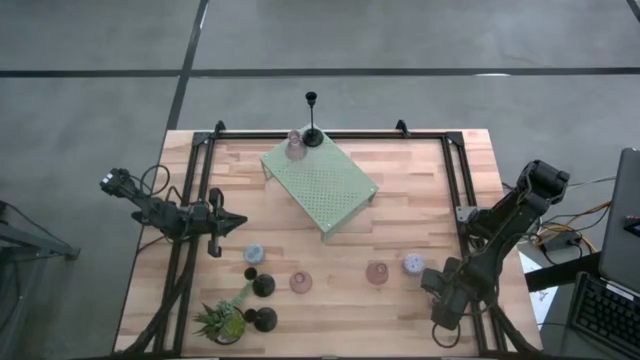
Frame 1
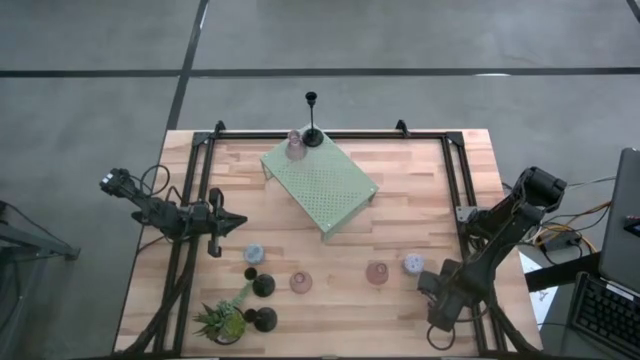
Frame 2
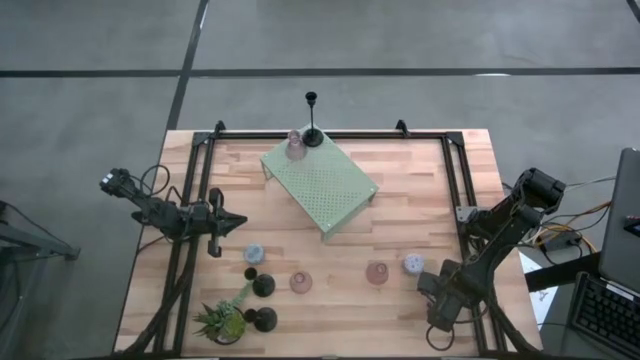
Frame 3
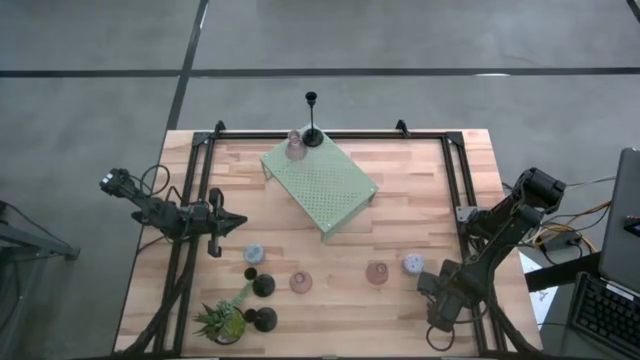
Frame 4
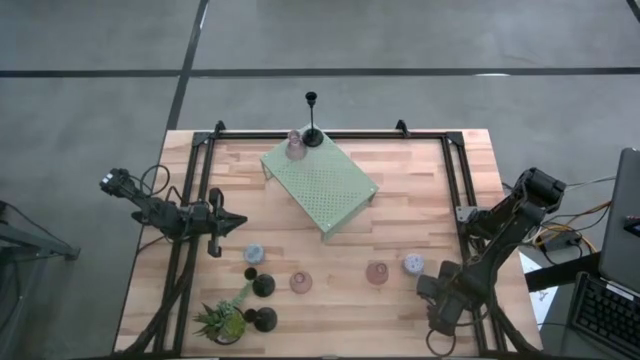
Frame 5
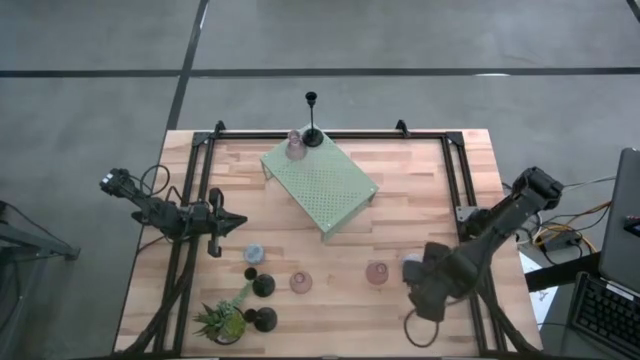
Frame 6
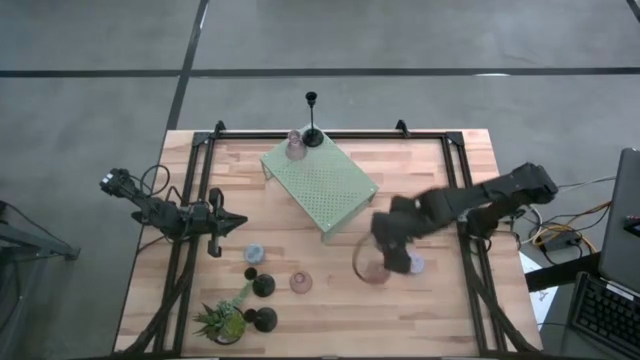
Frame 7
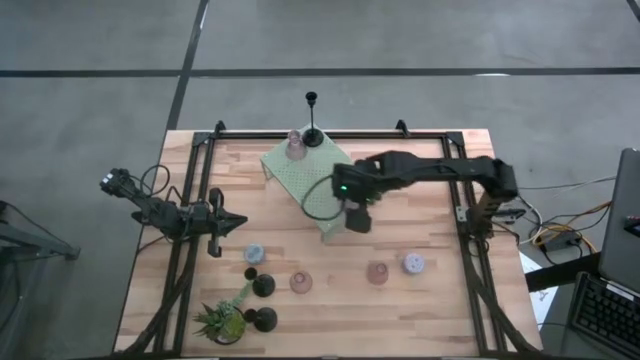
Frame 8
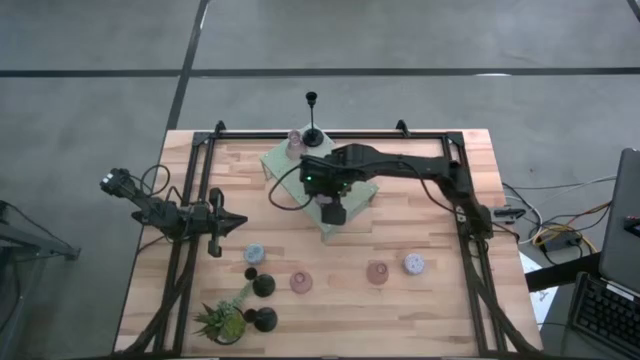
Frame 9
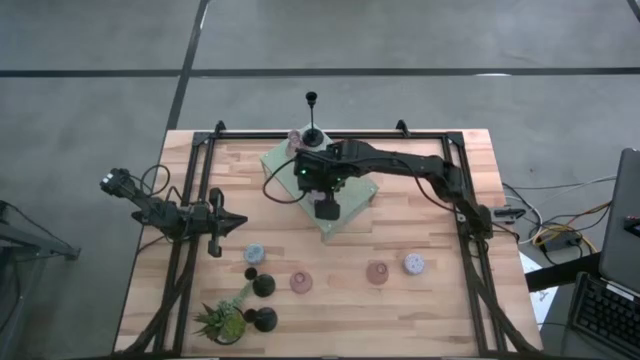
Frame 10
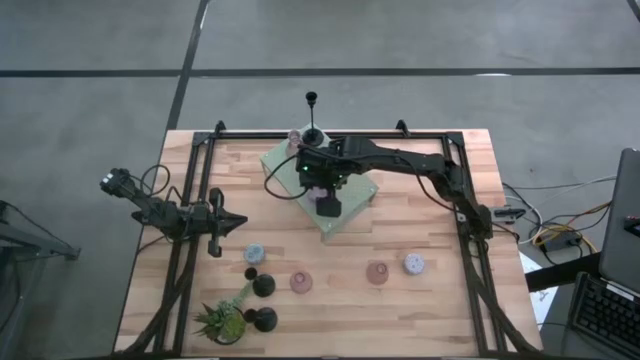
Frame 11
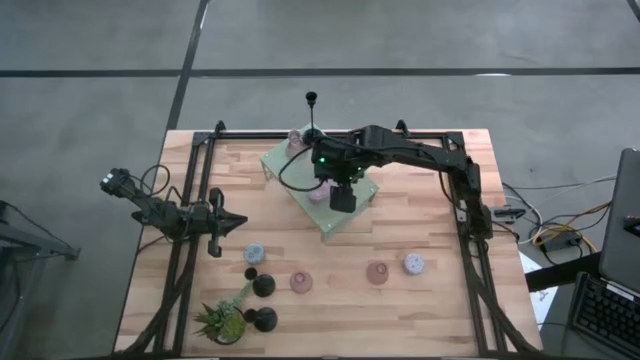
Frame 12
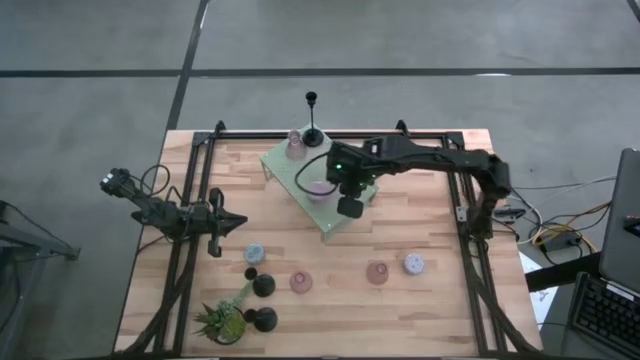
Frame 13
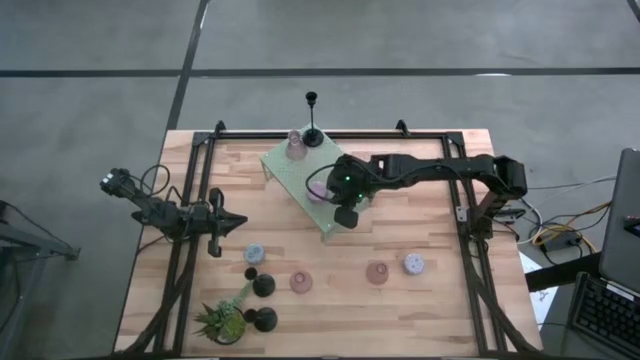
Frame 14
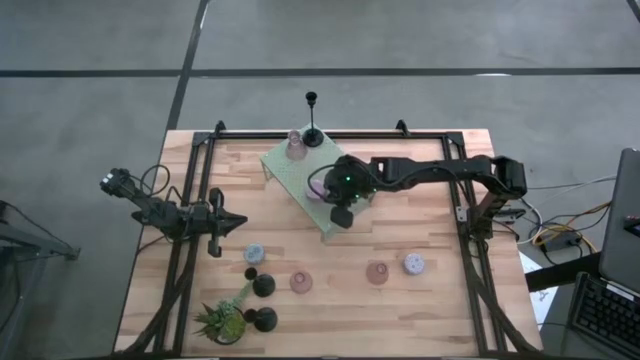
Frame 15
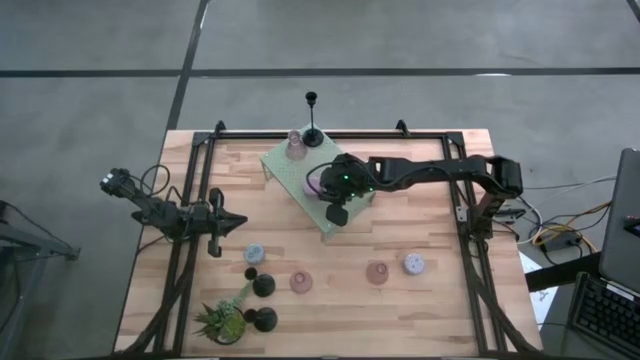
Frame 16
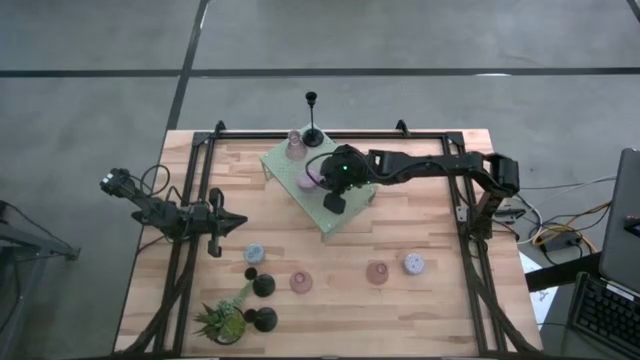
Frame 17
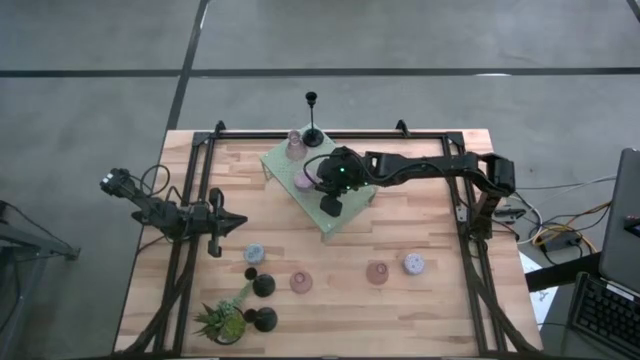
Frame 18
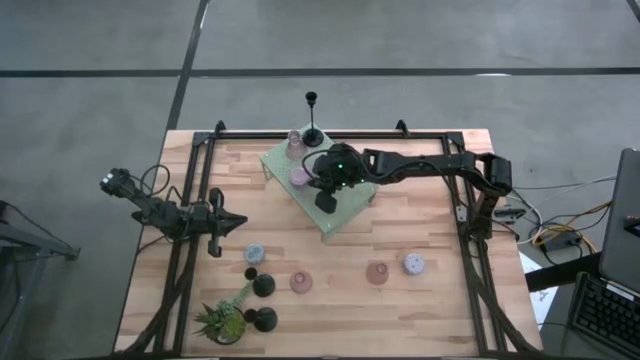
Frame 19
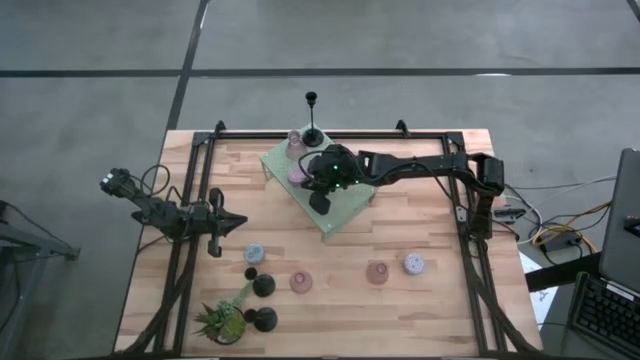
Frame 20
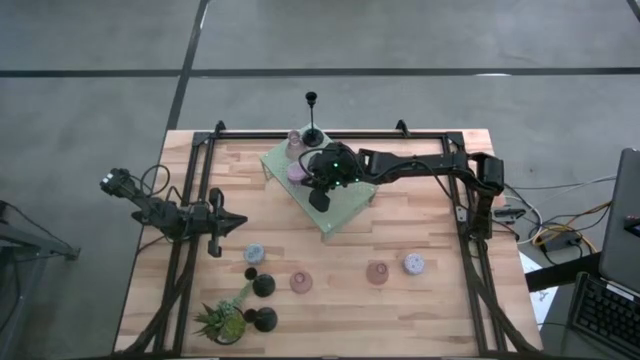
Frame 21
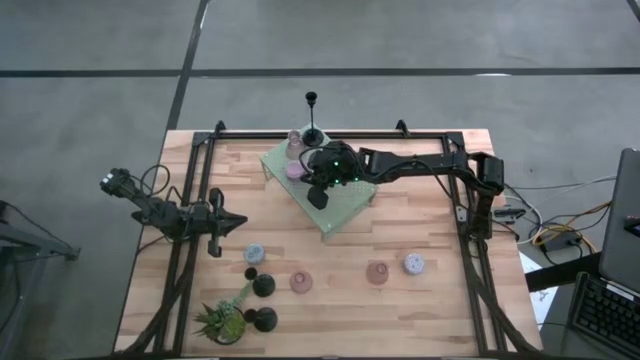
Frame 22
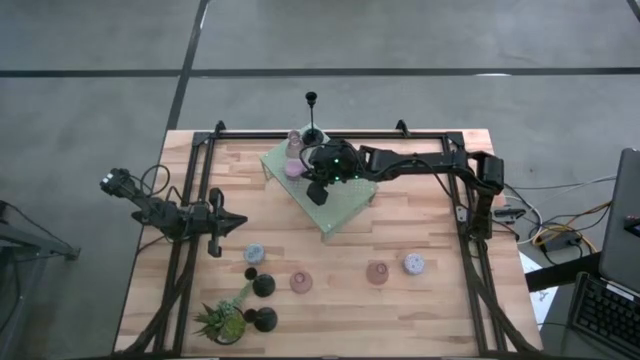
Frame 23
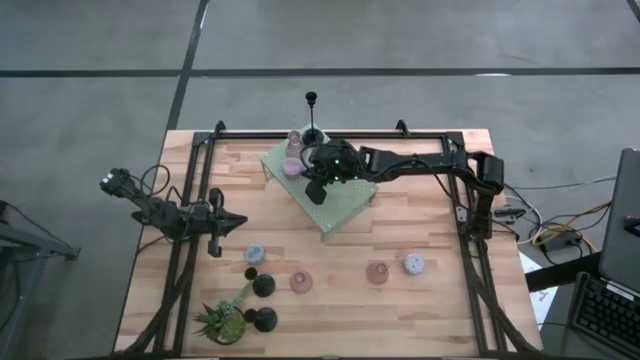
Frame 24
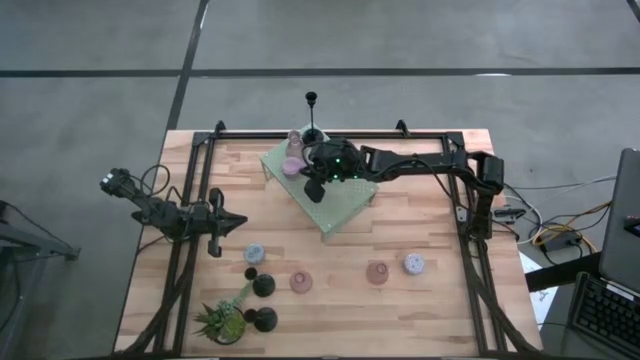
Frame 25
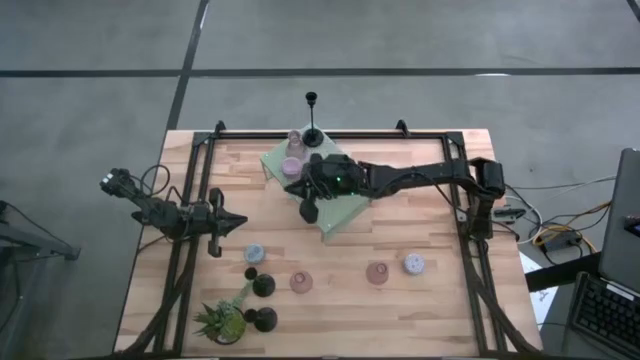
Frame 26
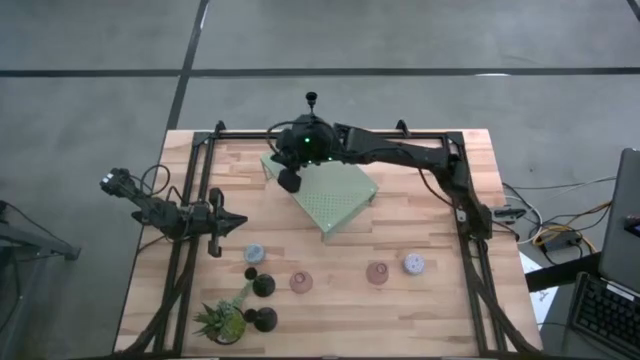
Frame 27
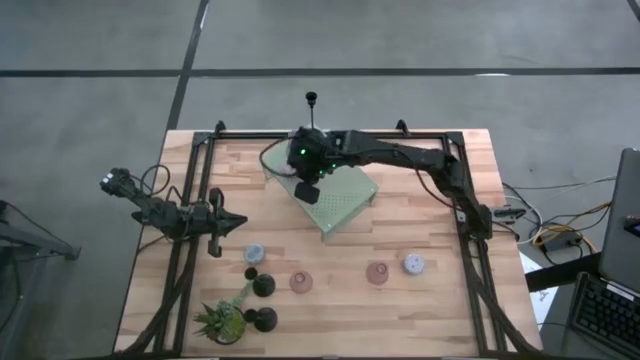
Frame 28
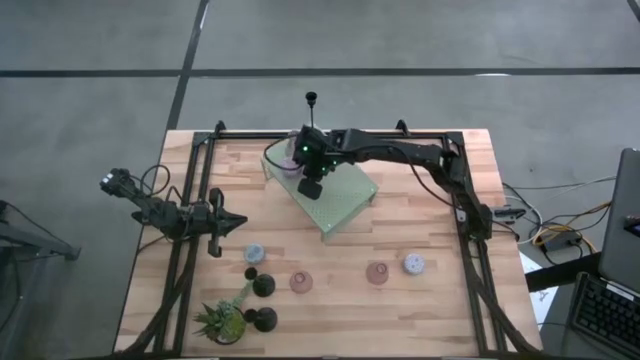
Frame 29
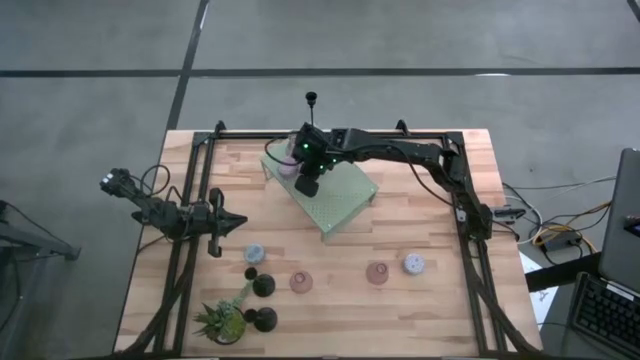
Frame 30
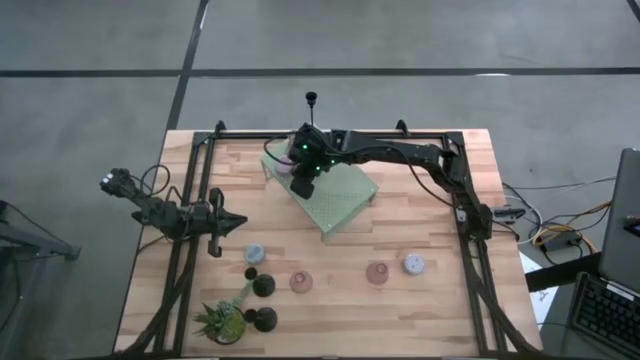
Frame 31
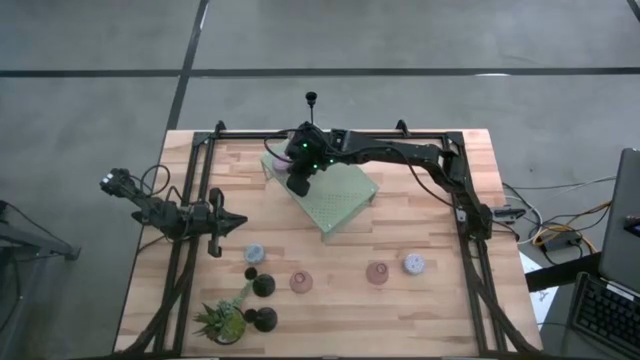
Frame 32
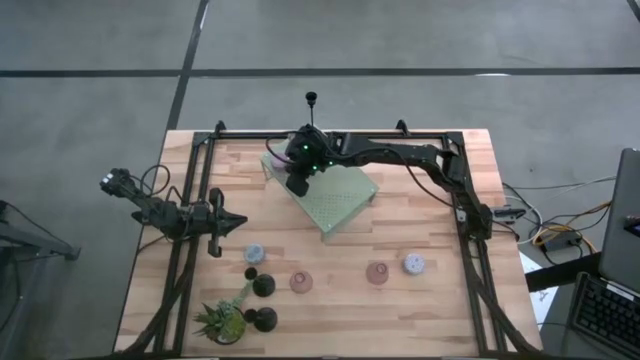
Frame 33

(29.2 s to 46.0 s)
Task: Pick & Place candle stick holders
Put the pink scented candle on the shelf aligned with the pink glass candle holder

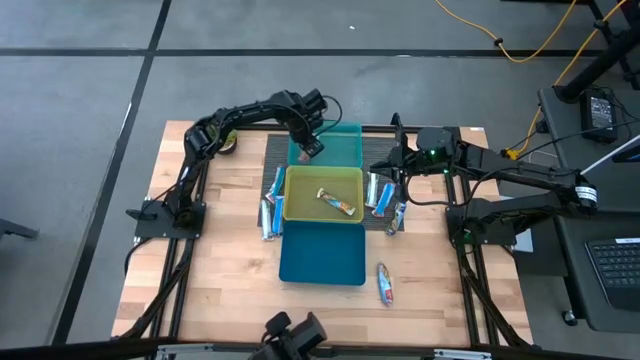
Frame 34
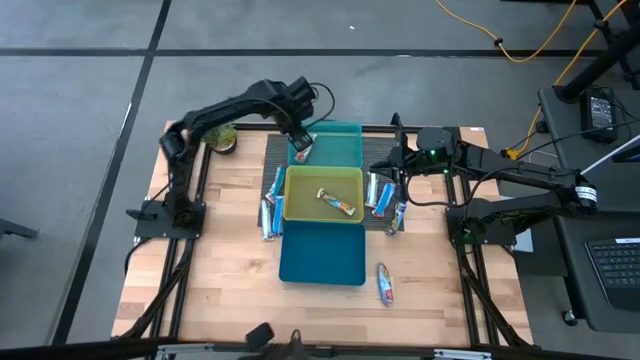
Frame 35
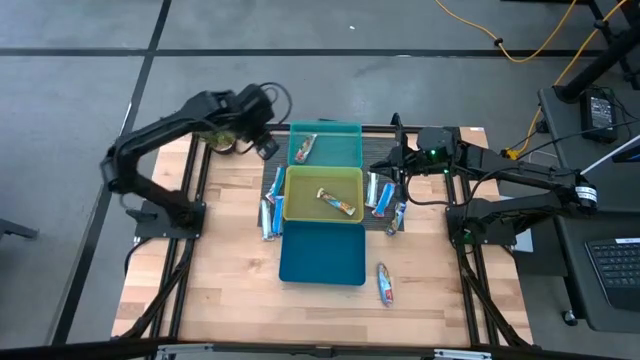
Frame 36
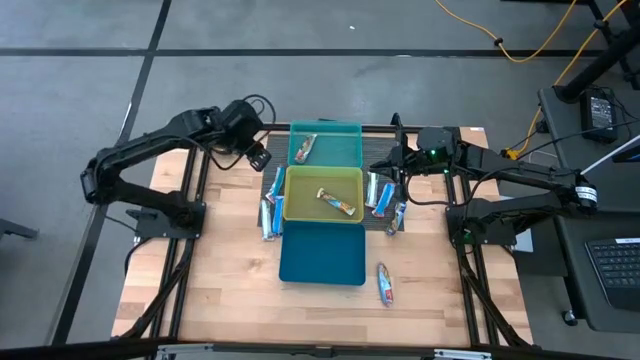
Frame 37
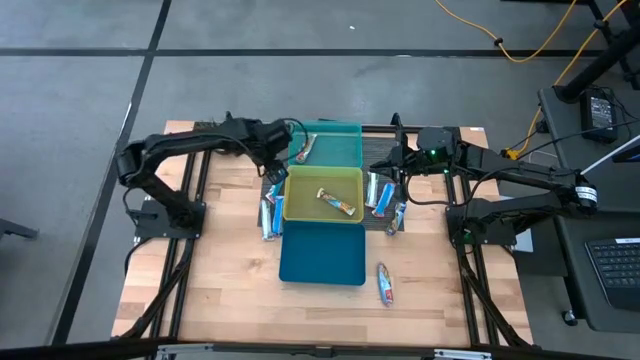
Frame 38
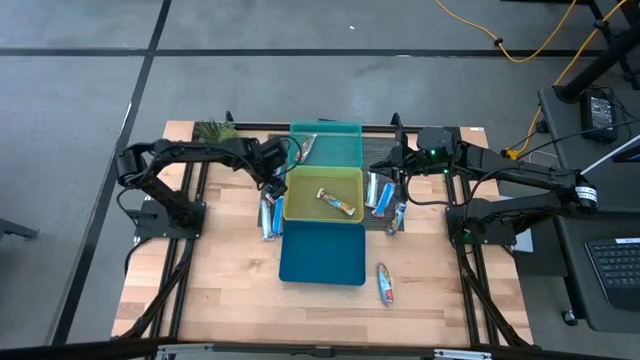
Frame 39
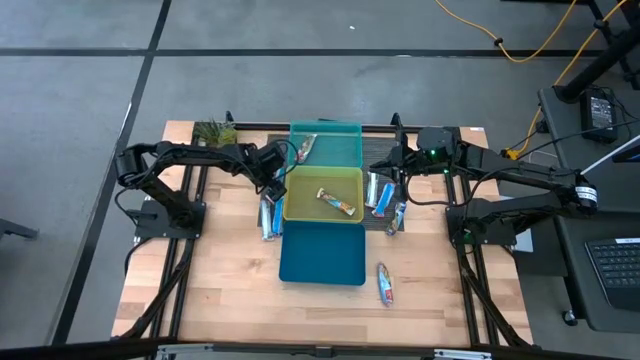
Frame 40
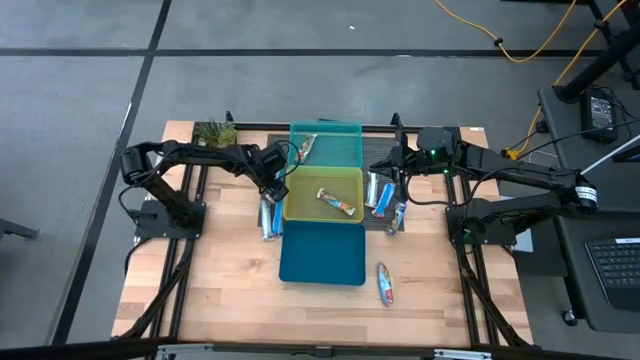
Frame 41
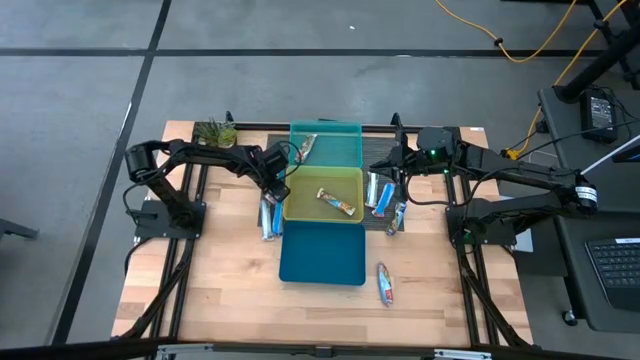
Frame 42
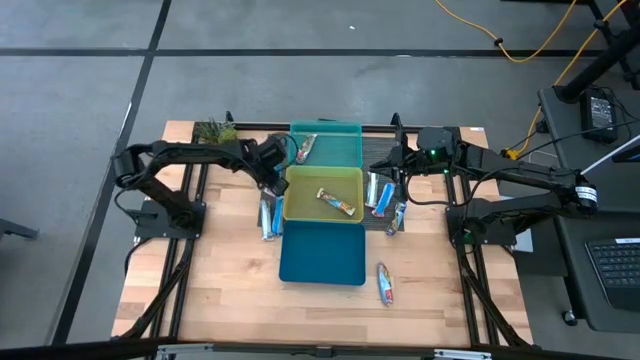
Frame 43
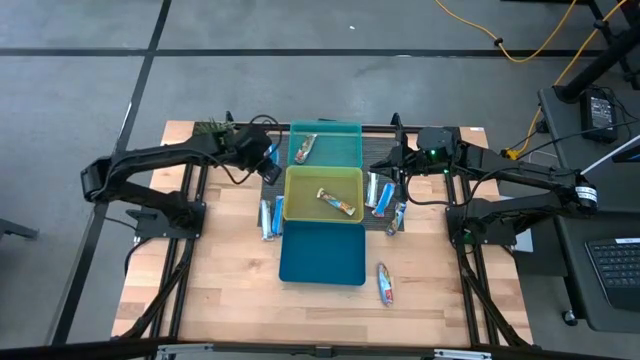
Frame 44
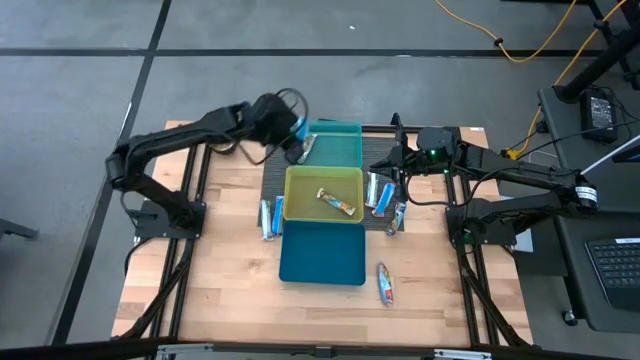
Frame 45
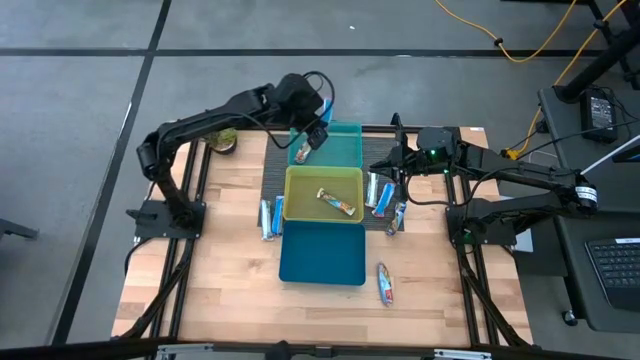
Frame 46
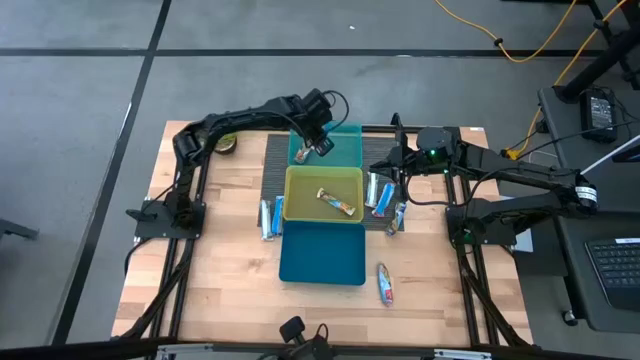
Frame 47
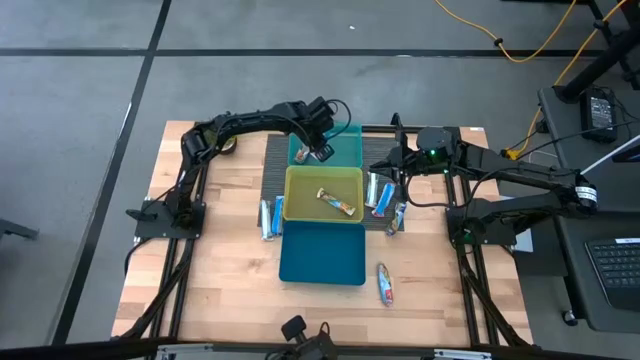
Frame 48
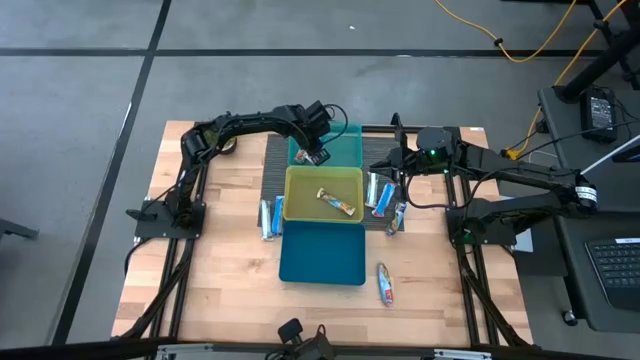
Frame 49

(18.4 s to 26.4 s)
Task: Pick and place Granola Bars by type
Put the red granola bar into the green bin
